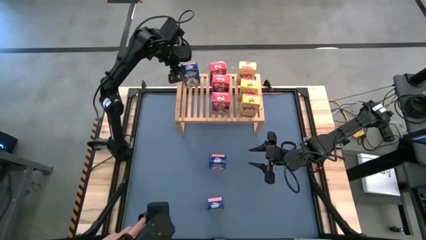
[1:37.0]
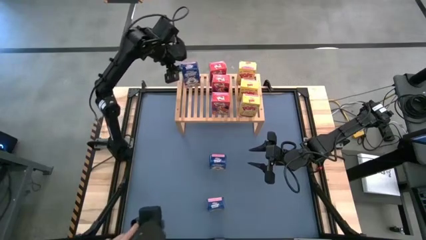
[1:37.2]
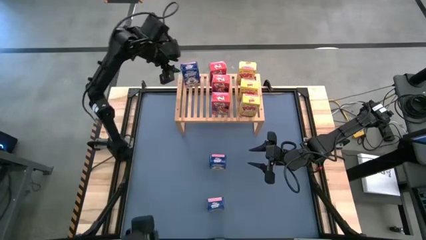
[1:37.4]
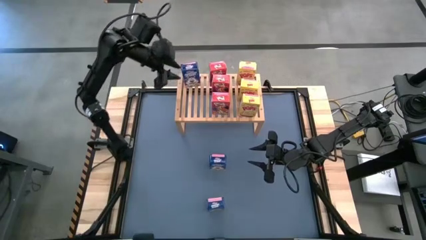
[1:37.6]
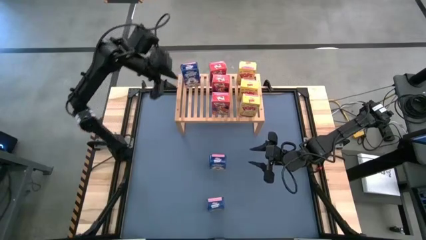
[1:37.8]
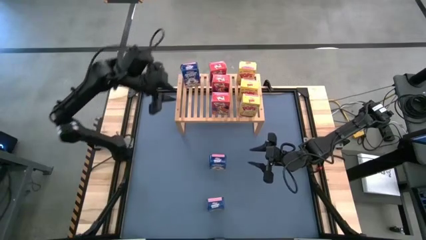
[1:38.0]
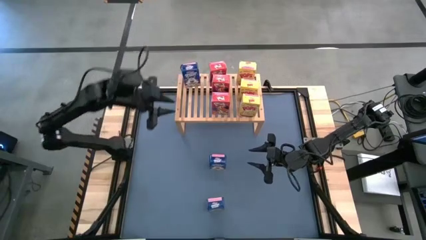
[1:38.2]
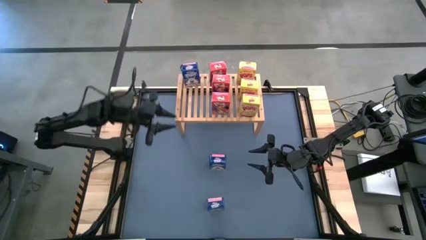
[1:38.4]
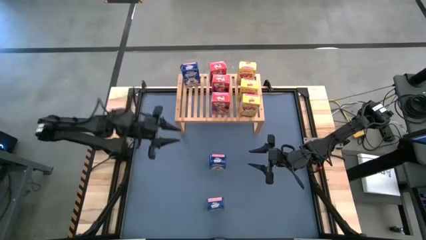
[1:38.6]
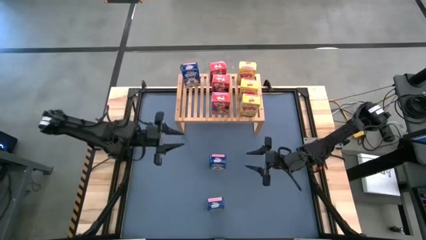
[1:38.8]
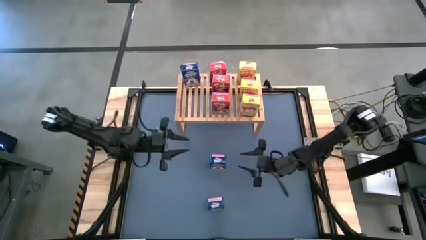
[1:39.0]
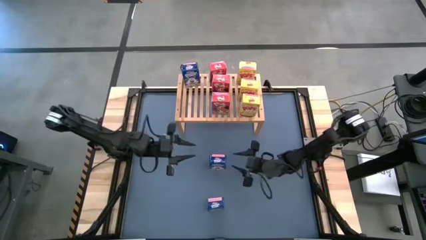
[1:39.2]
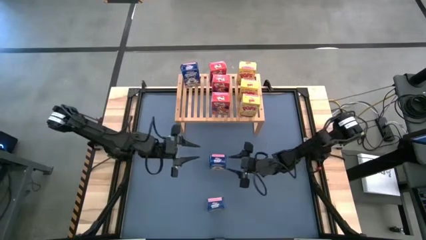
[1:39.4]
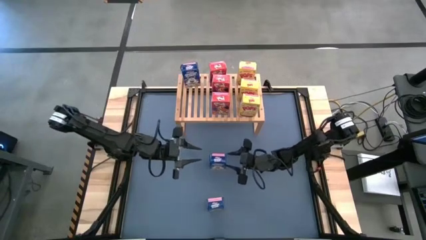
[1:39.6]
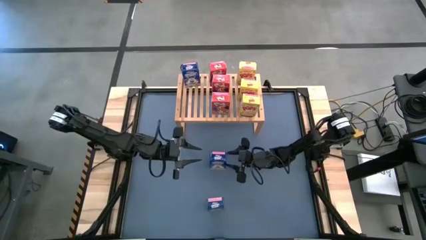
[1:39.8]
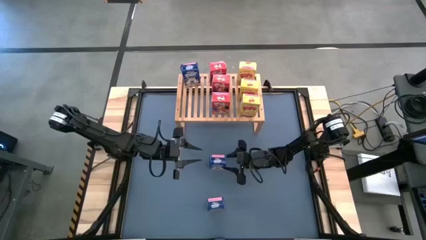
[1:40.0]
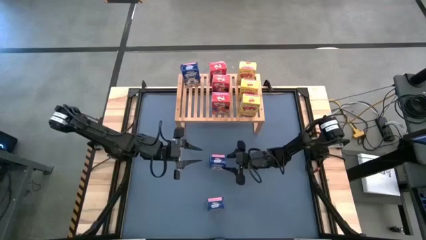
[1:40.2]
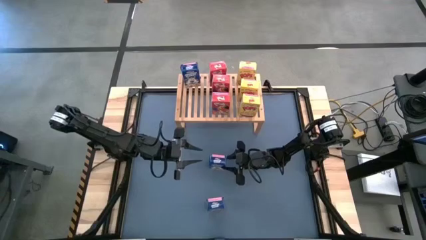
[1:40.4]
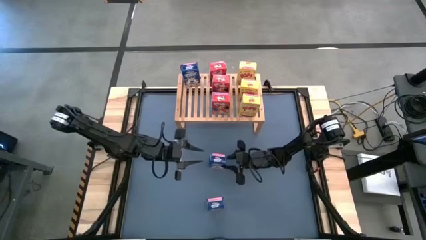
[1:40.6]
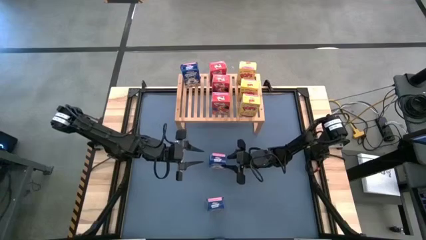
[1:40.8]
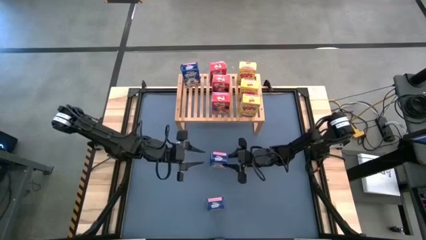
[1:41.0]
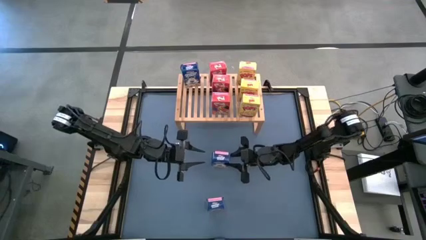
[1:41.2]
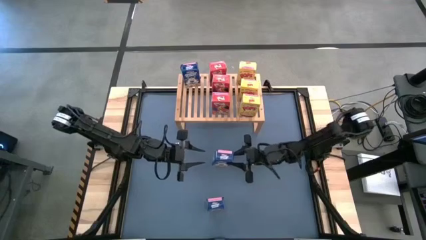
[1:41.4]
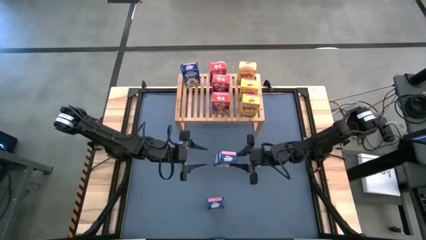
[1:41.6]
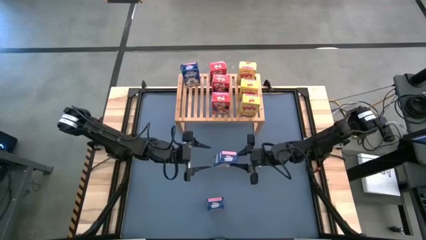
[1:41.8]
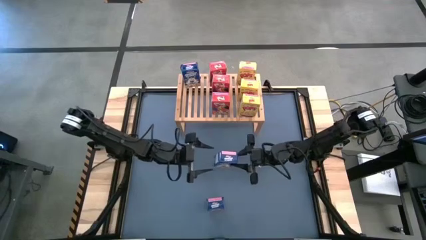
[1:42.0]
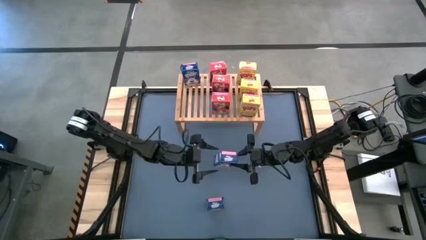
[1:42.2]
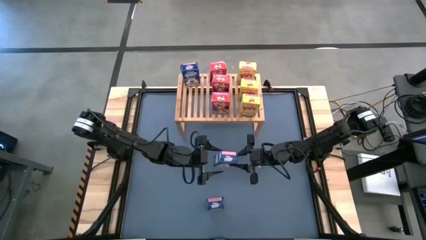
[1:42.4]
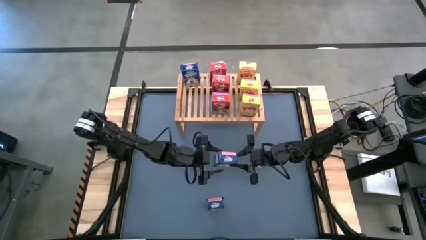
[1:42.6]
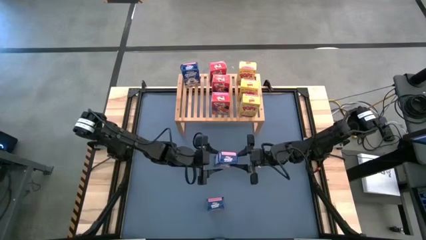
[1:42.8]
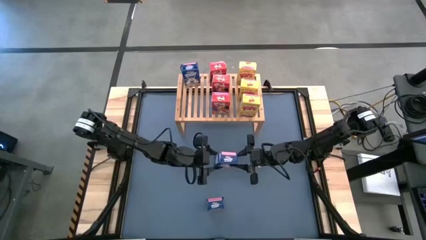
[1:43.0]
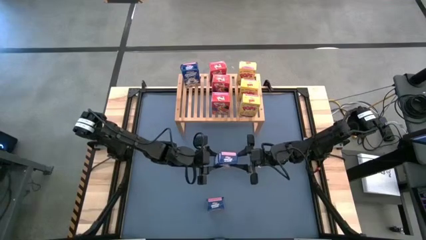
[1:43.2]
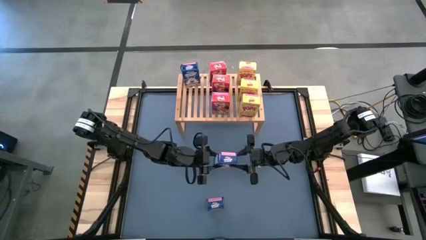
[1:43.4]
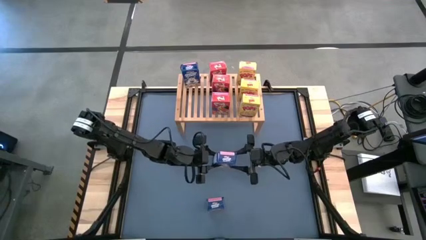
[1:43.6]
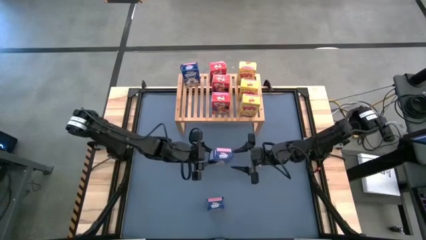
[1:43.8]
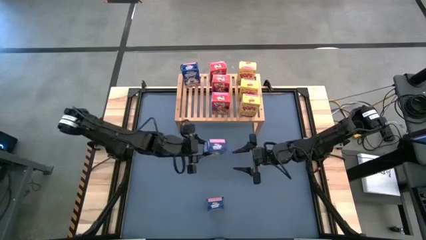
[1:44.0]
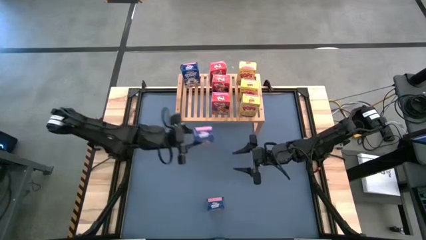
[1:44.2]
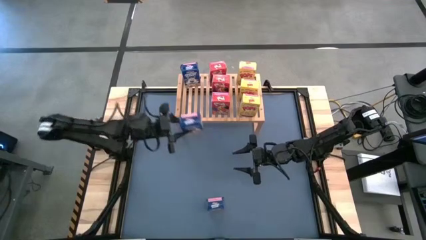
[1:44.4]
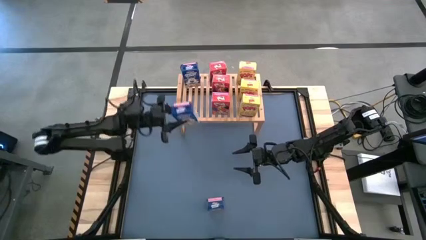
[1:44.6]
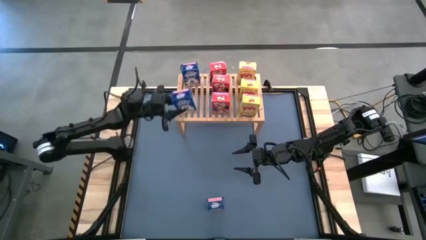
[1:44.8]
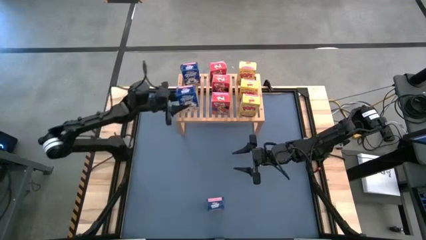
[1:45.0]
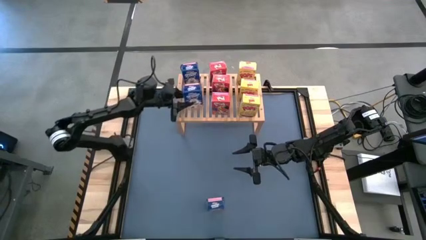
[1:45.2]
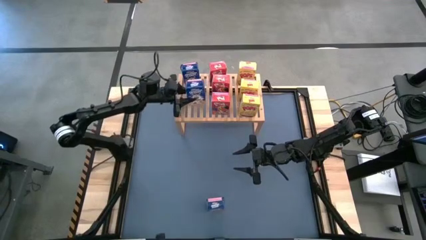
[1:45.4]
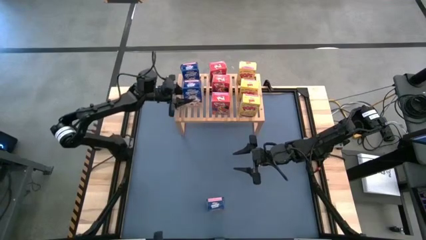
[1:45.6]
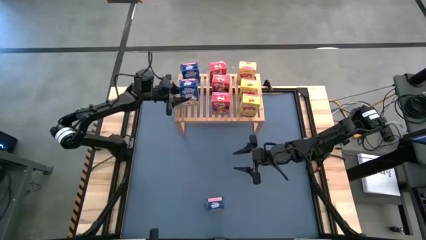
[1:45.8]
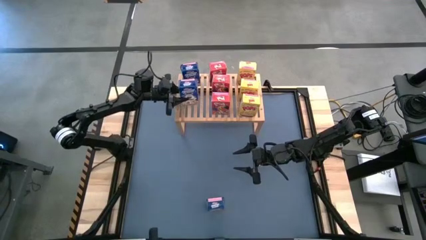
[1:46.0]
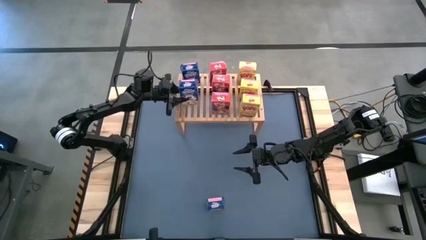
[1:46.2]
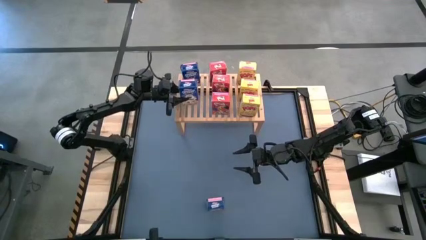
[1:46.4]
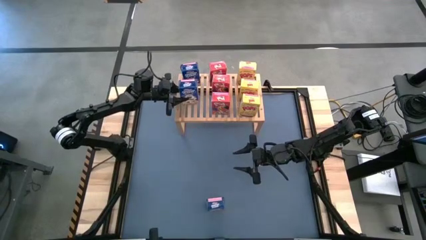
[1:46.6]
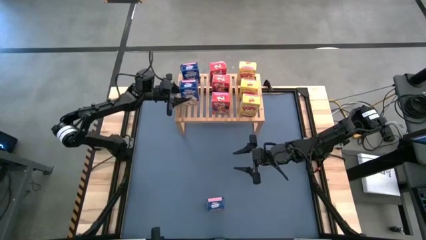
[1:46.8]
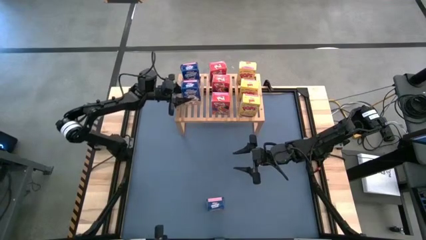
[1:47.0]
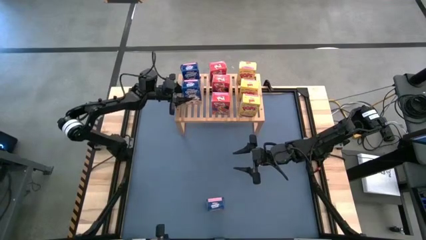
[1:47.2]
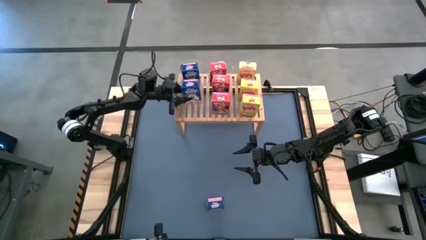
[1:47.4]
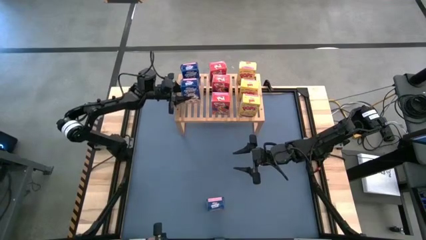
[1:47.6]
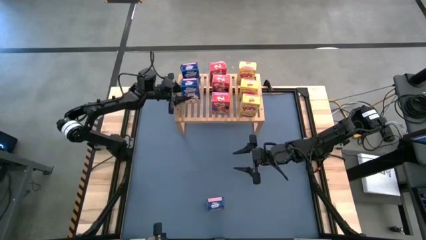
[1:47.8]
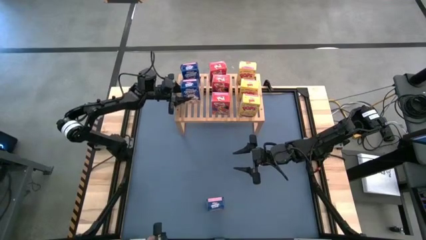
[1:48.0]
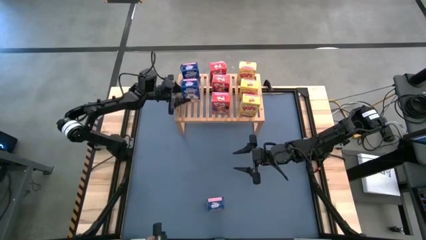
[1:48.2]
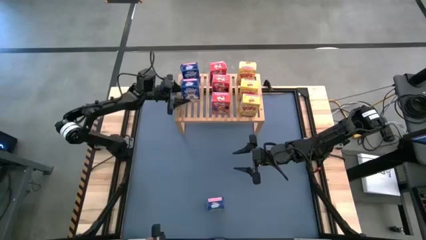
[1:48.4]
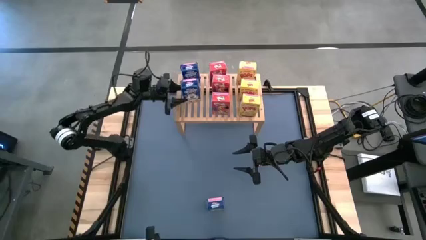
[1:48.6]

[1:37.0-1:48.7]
Task: Stack cereal on shelf
Put the top blue cereal box on the shelf aligned with the other blue cereal box

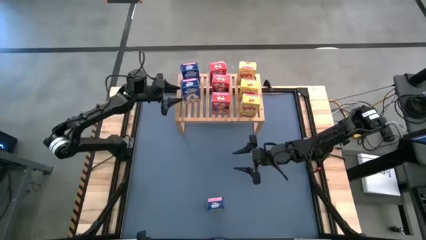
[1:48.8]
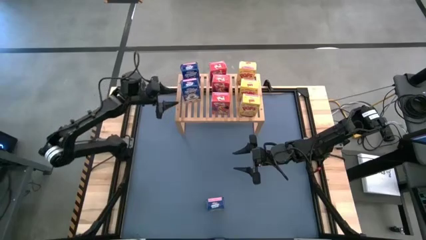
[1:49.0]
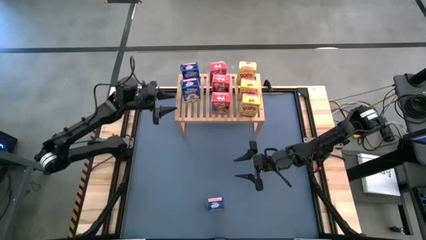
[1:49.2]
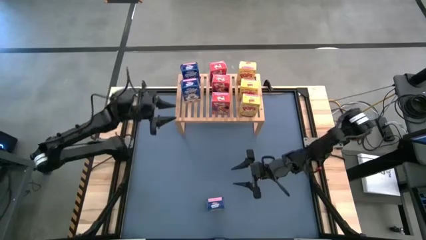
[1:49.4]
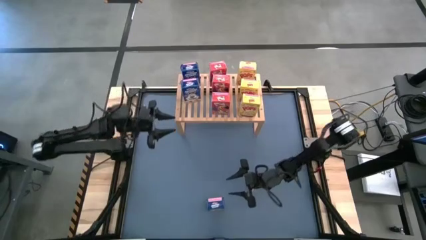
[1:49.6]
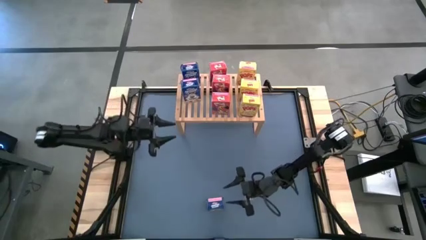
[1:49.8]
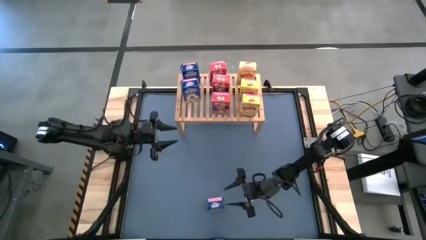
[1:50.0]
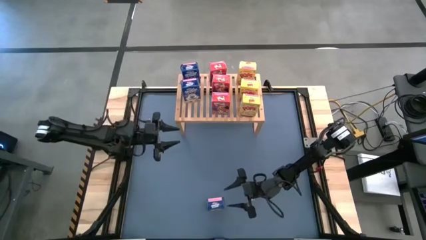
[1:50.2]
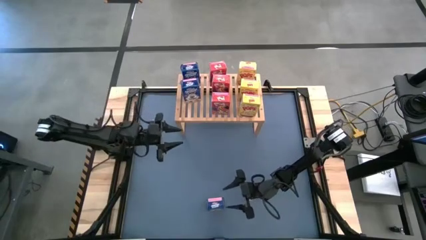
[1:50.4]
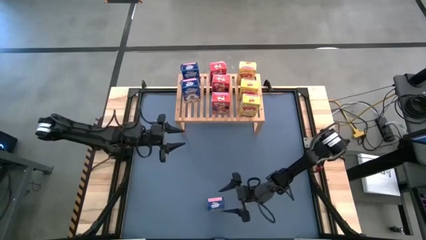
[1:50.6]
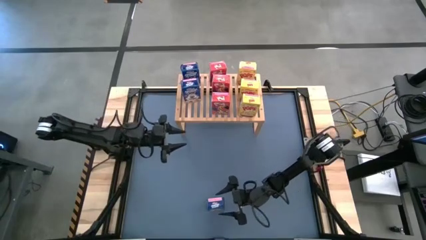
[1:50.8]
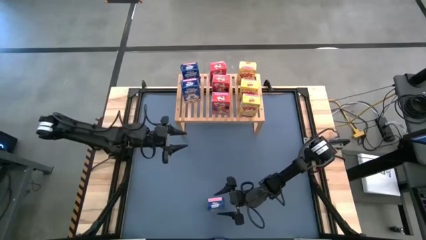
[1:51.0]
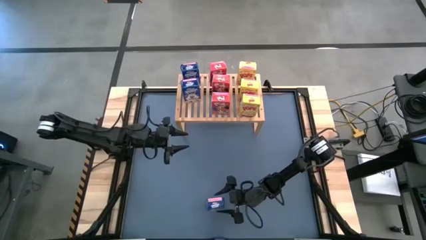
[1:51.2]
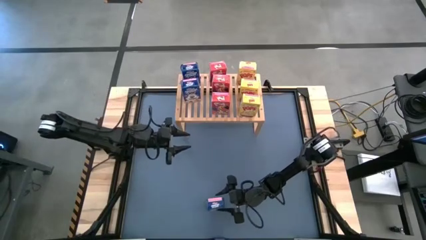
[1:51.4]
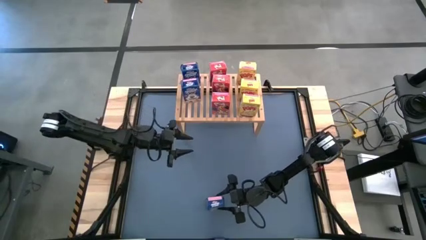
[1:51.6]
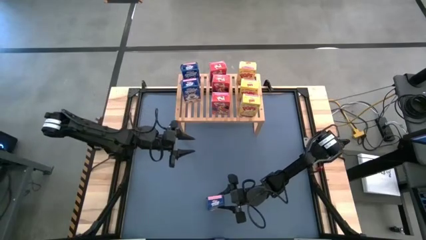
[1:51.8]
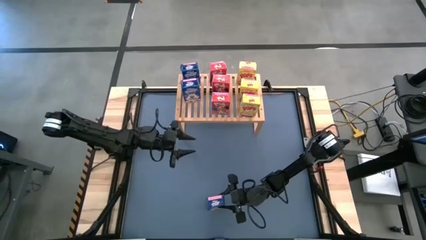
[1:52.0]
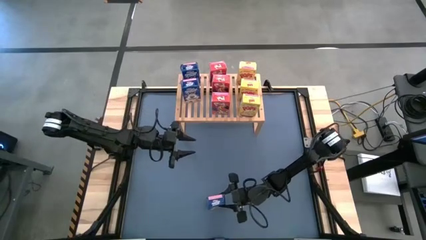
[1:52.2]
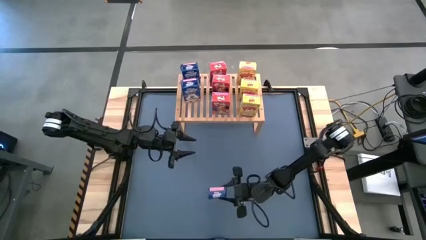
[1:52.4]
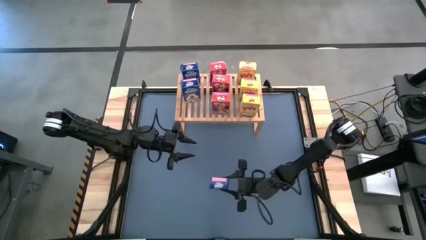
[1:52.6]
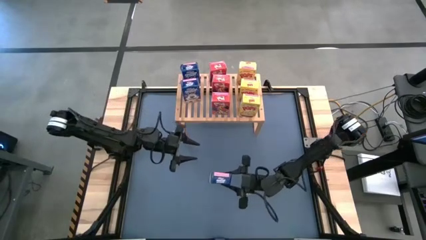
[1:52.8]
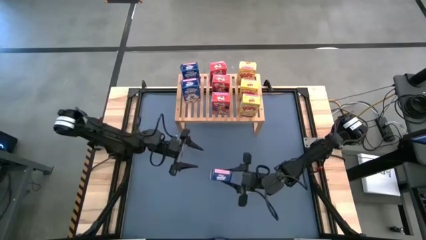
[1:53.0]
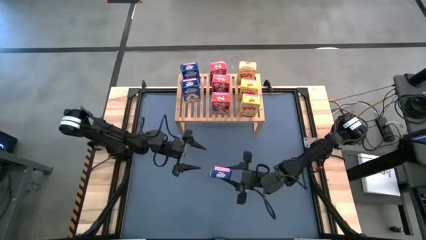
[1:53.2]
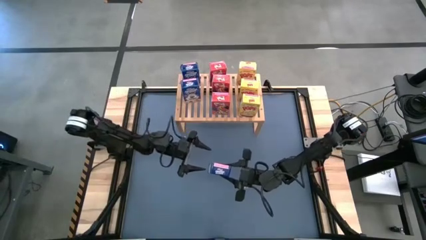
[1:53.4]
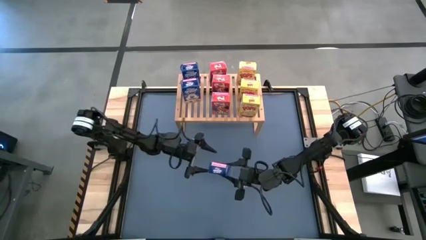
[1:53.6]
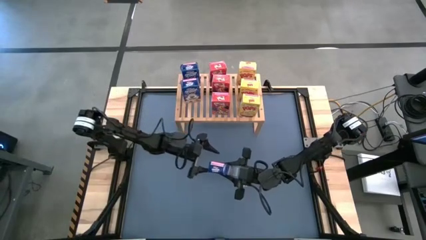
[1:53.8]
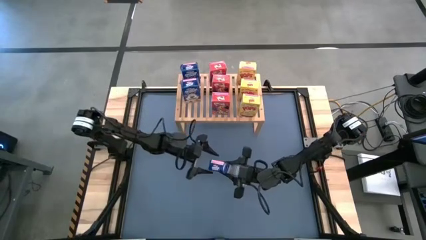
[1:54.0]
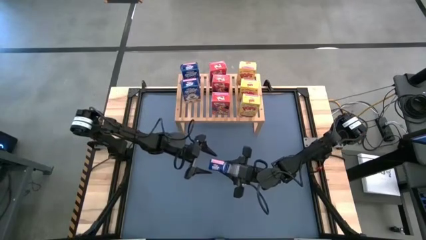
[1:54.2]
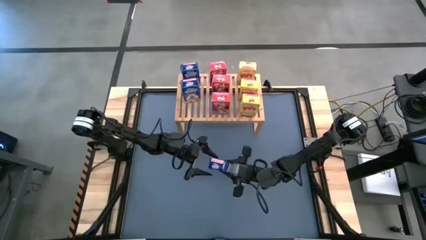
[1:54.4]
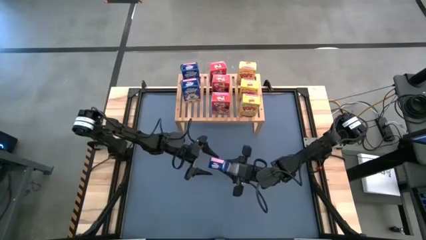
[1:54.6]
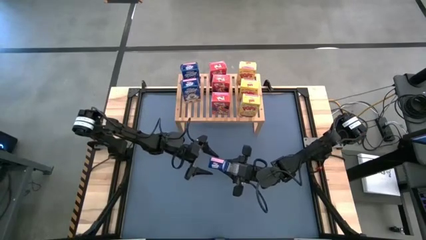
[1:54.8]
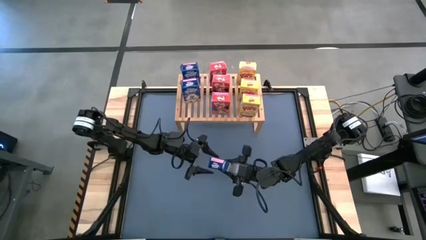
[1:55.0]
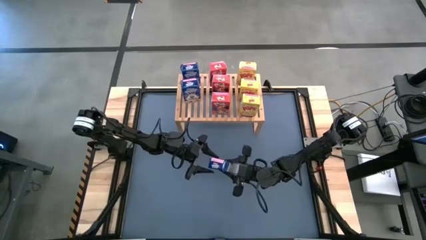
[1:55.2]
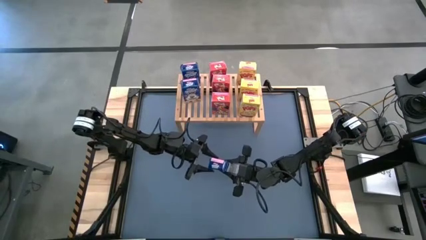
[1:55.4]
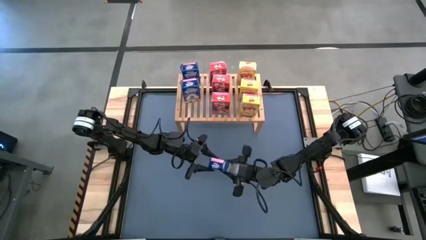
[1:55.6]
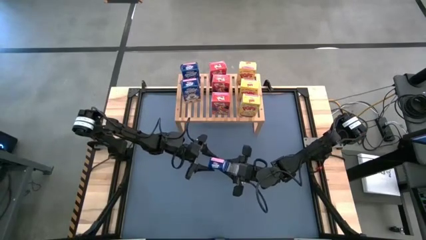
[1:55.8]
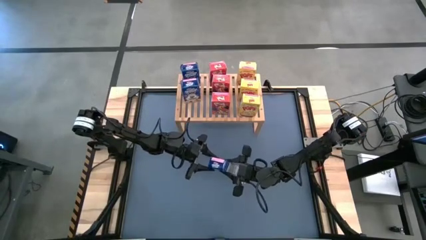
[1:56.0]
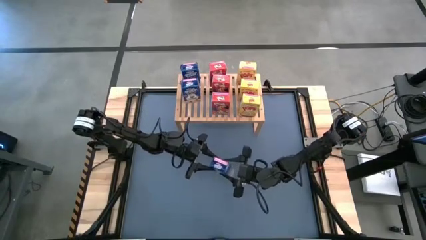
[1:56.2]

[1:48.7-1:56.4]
Put the blue cereal box on the shelf aligned with the other blue cereal box
